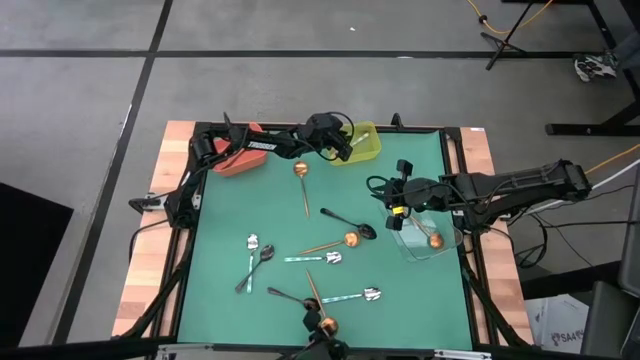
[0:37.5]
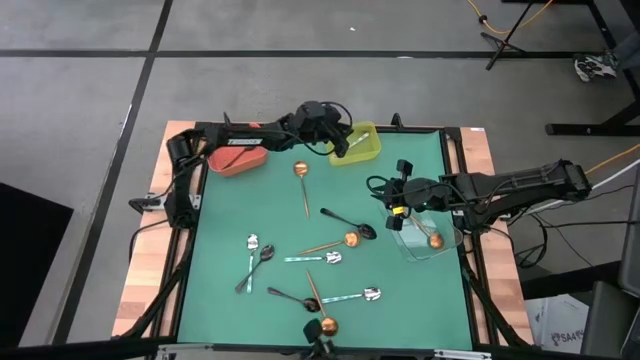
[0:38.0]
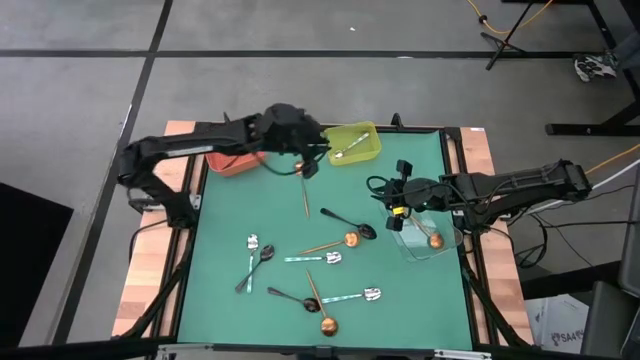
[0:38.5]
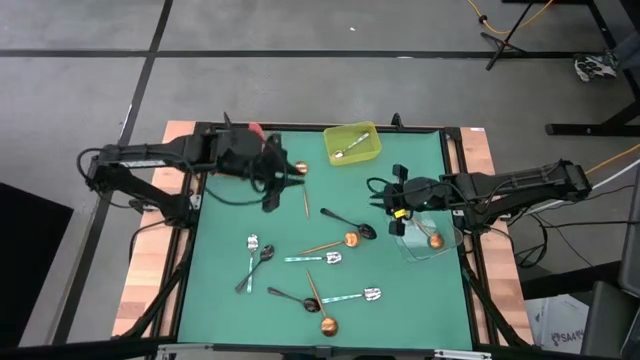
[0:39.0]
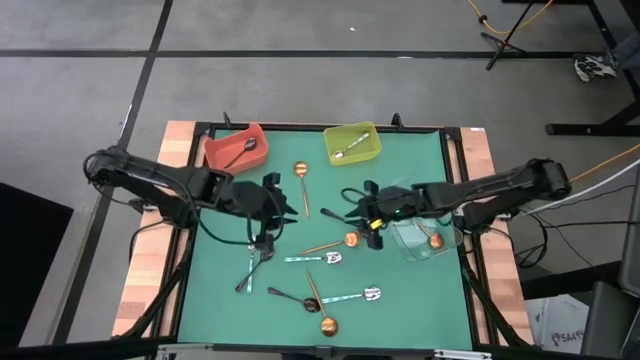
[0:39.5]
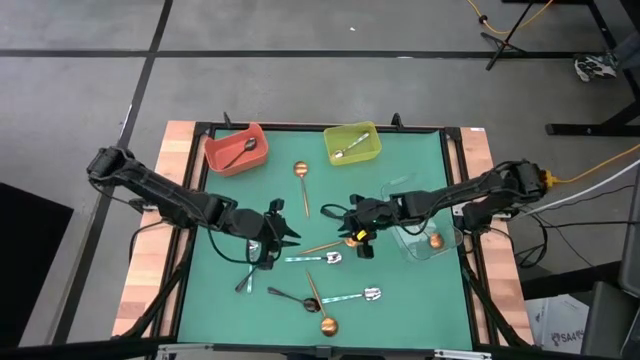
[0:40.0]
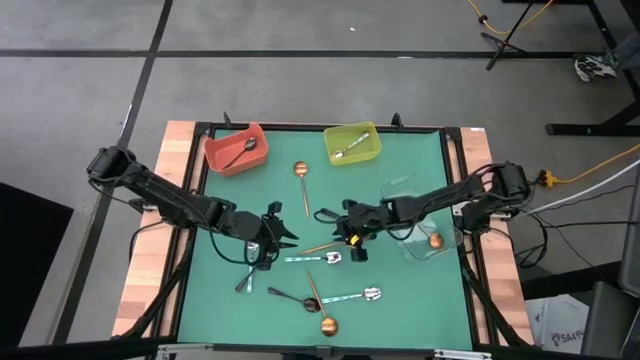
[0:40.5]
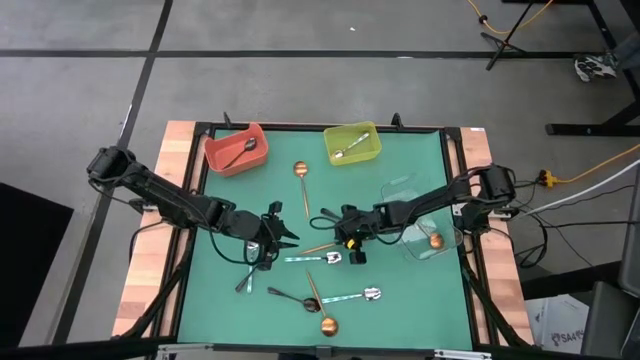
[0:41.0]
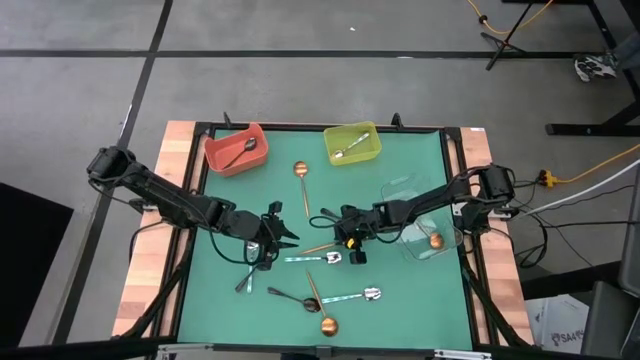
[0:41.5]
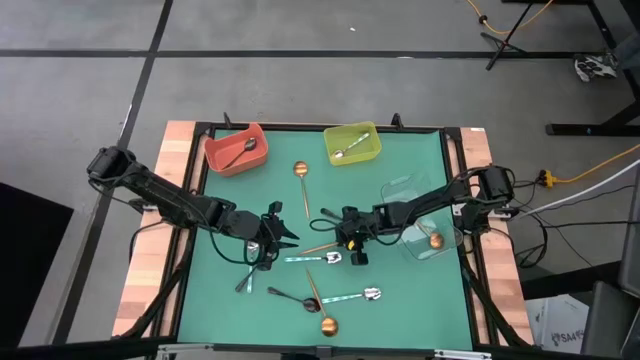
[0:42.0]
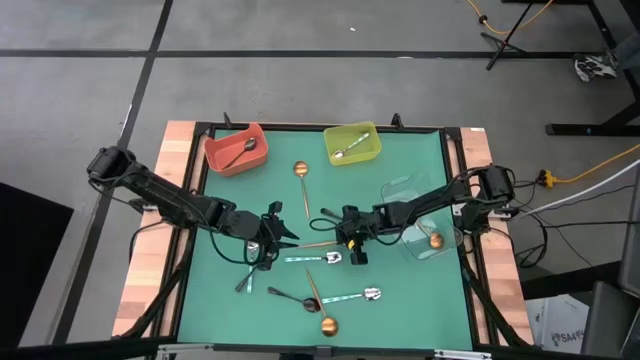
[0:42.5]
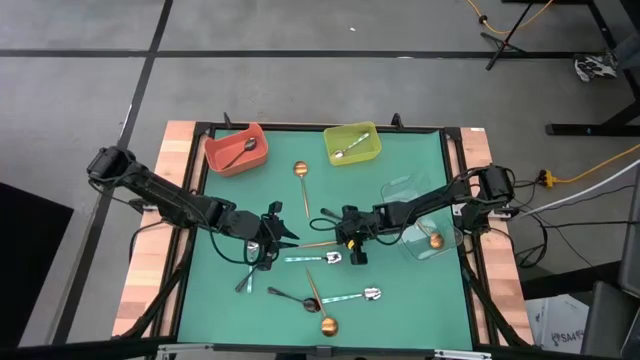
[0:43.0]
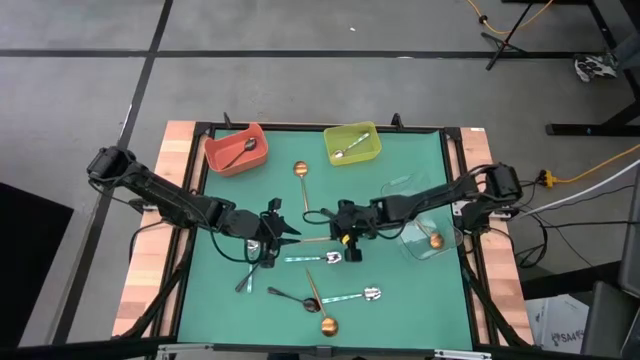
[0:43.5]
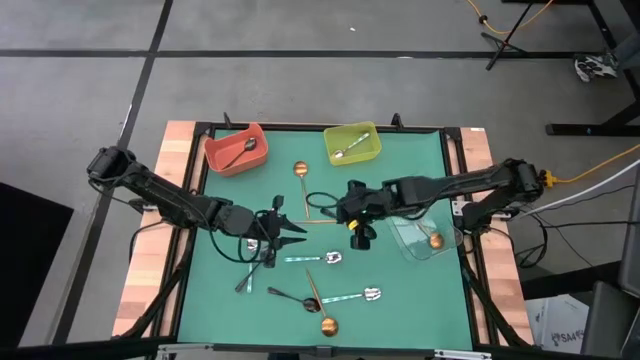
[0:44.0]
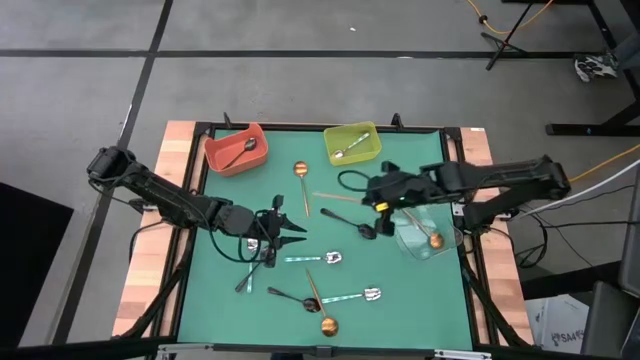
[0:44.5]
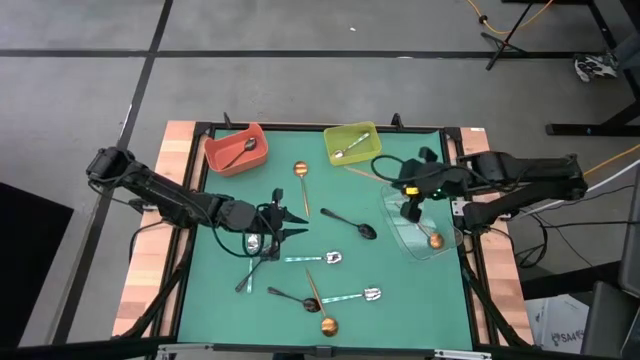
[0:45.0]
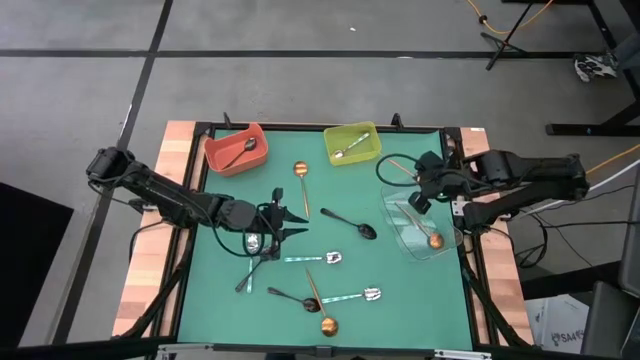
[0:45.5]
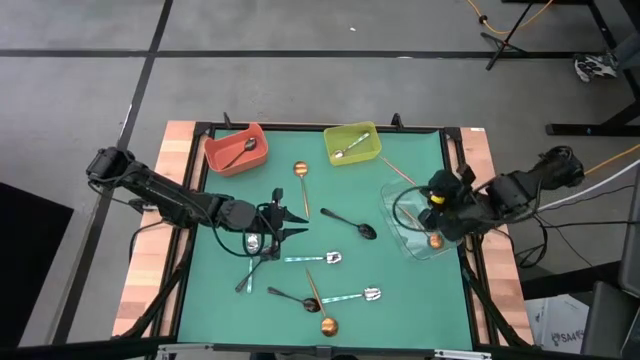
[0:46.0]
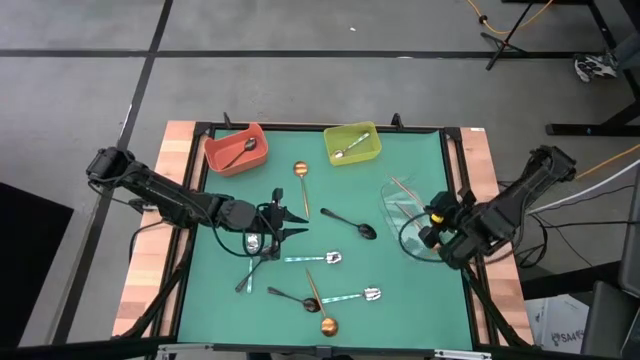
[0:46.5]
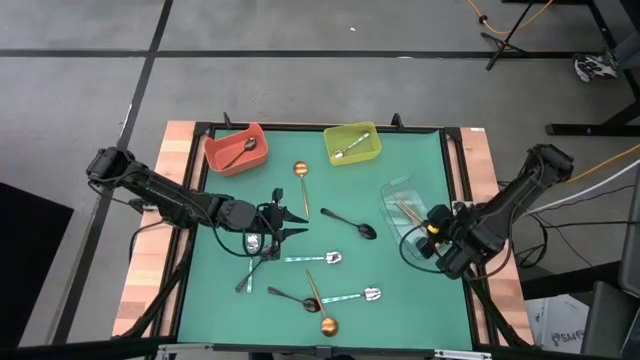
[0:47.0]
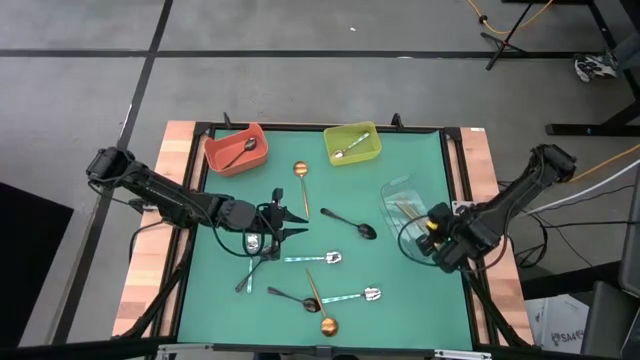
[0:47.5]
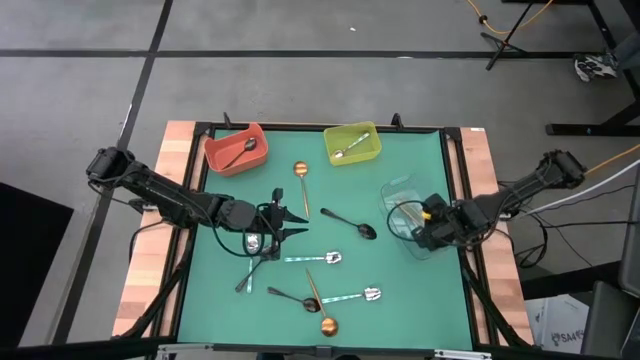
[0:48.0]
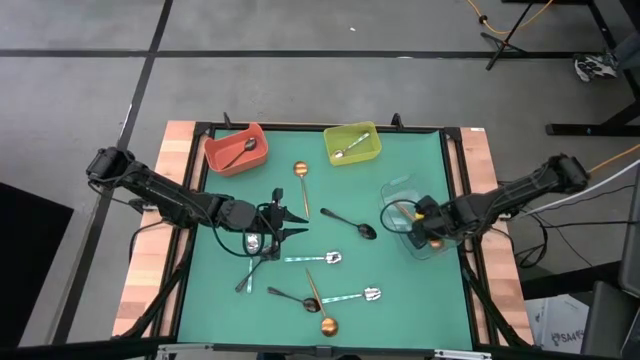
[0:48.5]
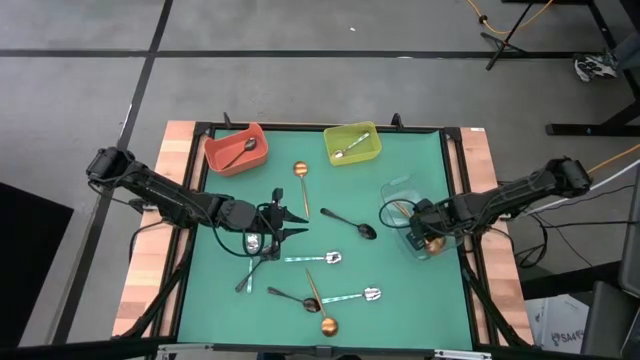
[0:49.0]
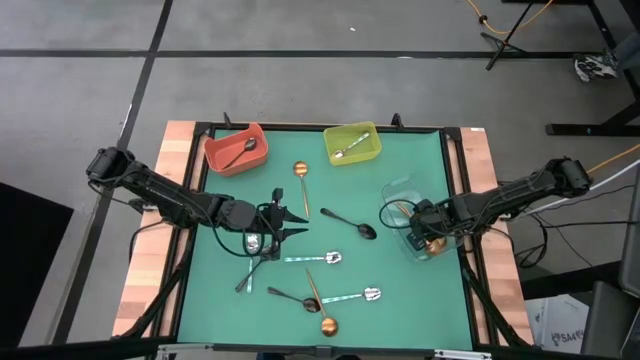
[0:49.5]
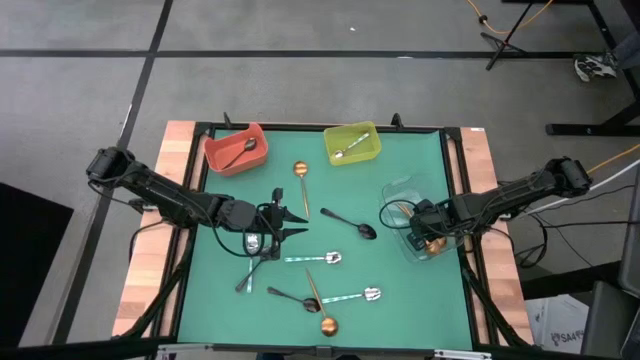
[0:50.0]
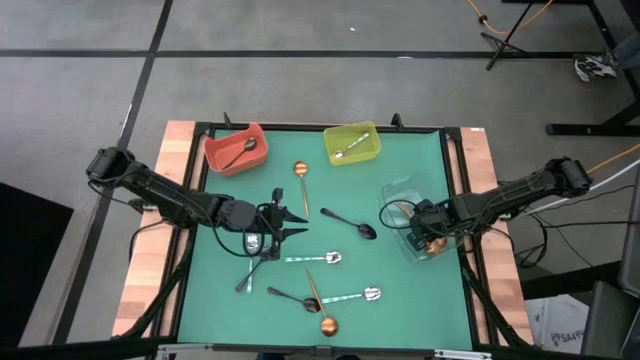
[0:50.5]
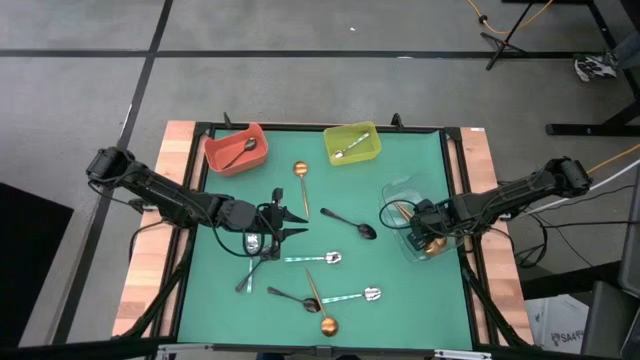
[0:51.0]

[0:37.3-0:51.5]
Task: Sort silverware by color (type)
Put the center gold spoon into the transparent bin

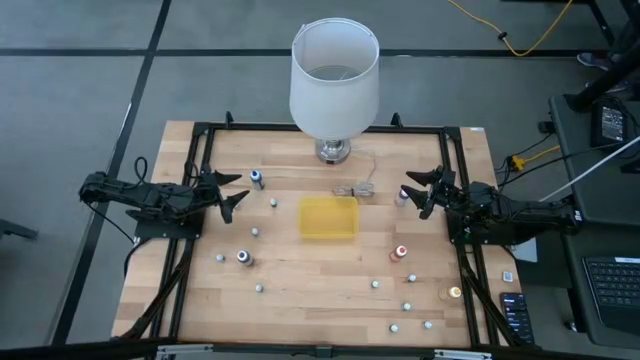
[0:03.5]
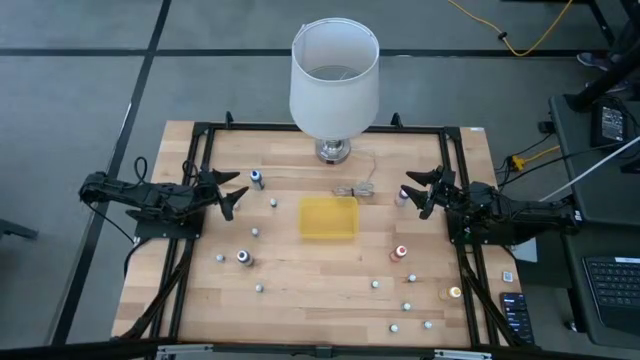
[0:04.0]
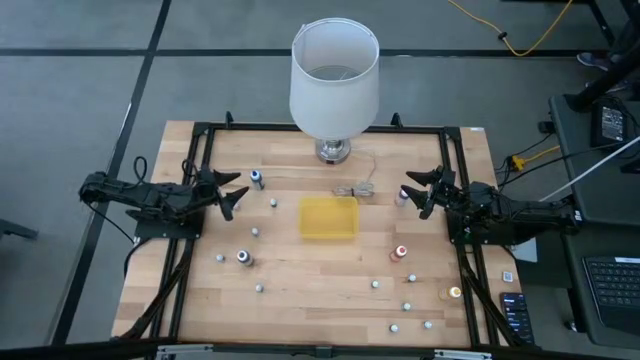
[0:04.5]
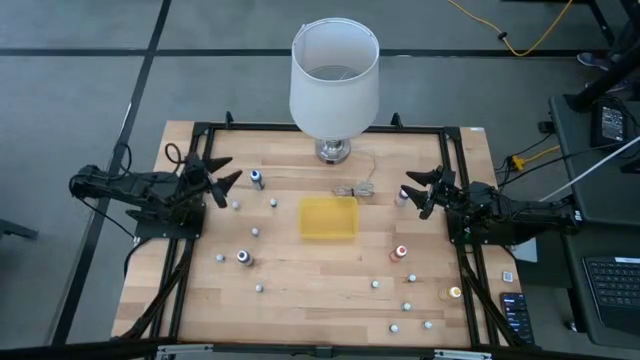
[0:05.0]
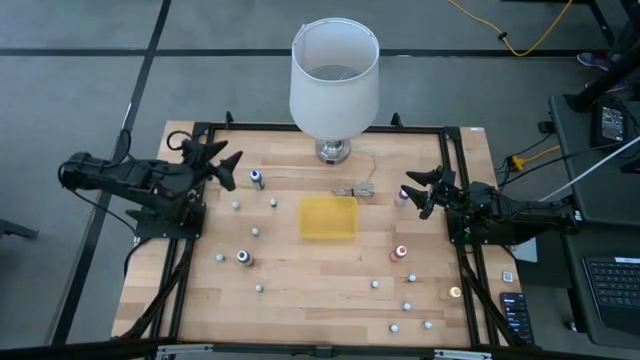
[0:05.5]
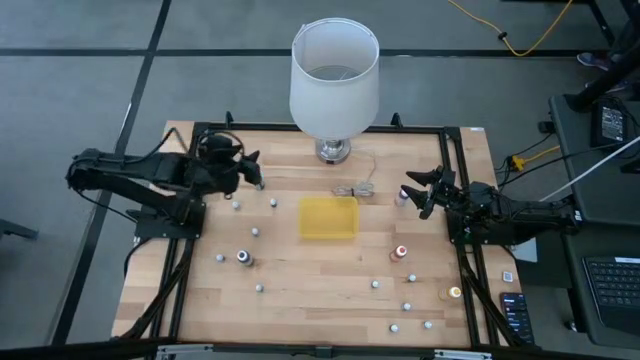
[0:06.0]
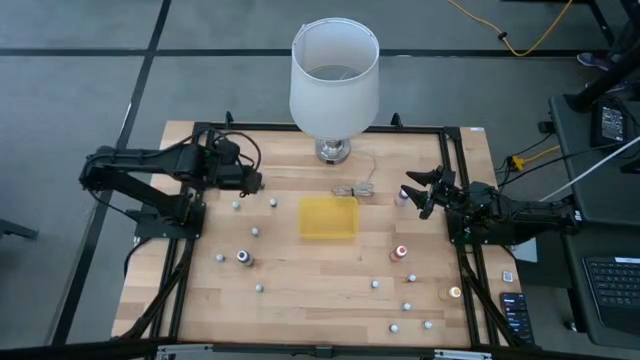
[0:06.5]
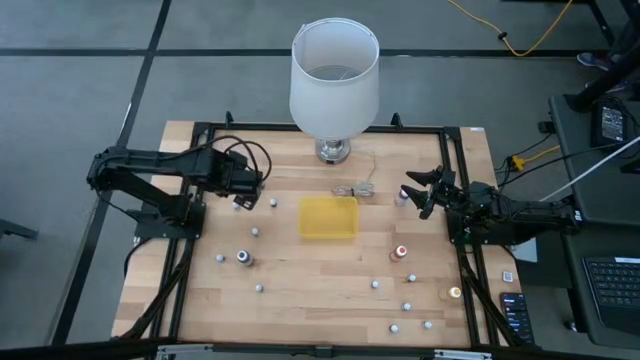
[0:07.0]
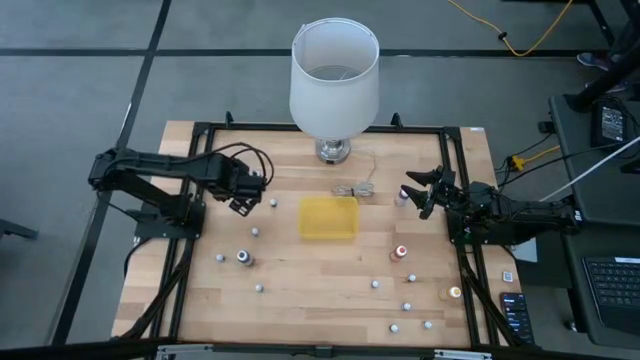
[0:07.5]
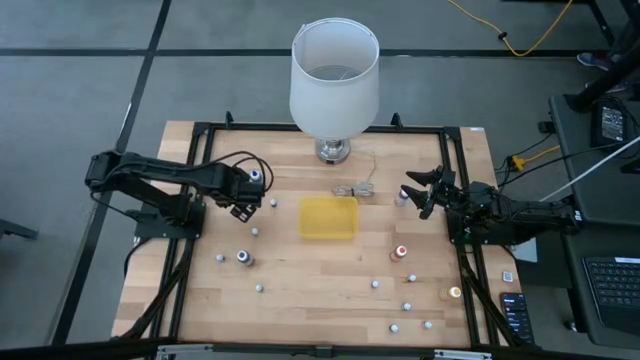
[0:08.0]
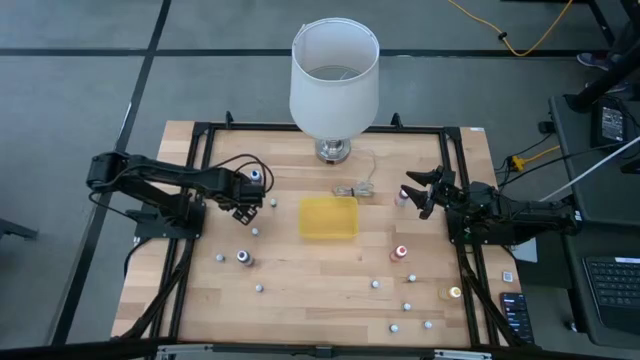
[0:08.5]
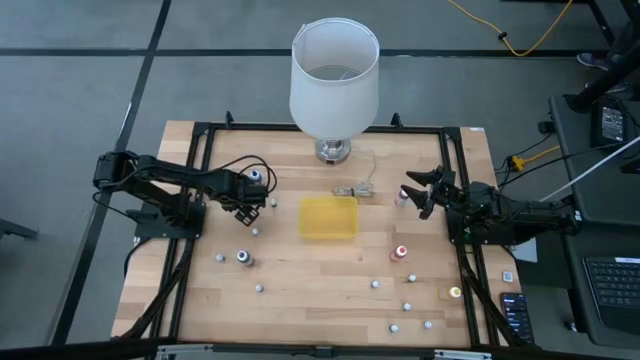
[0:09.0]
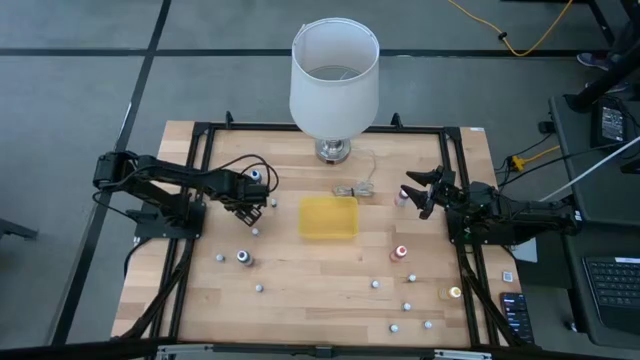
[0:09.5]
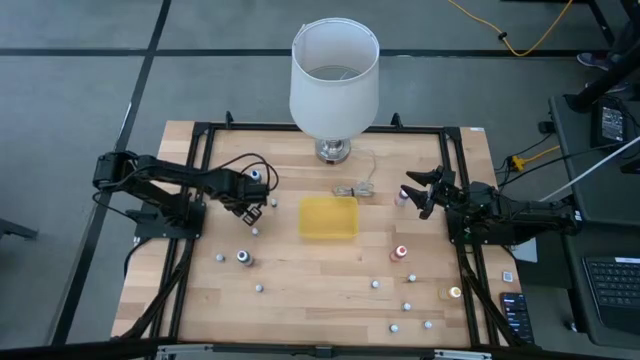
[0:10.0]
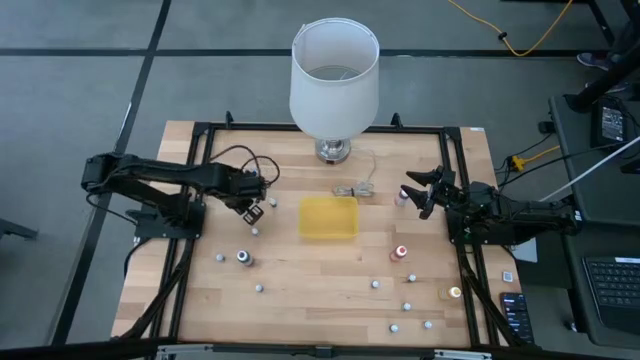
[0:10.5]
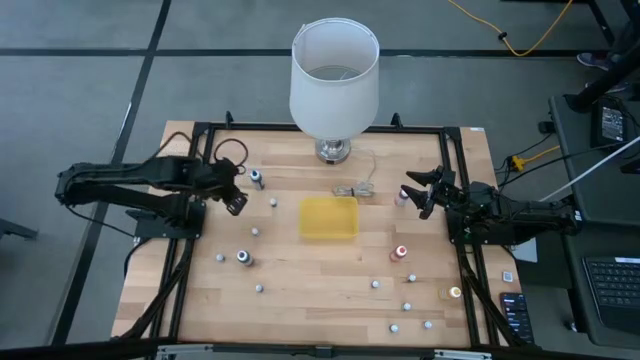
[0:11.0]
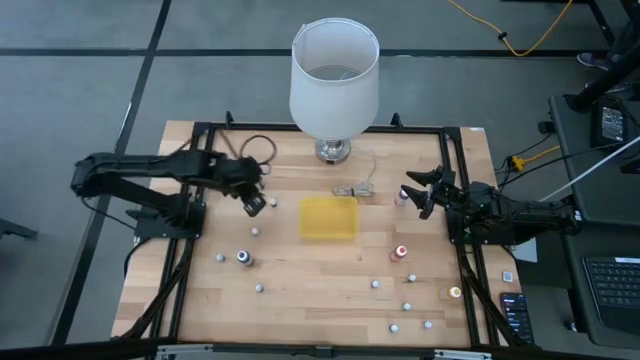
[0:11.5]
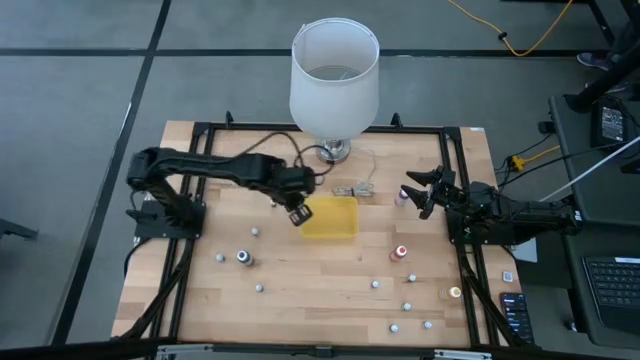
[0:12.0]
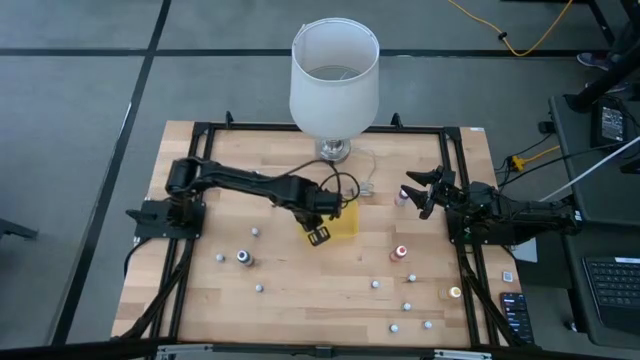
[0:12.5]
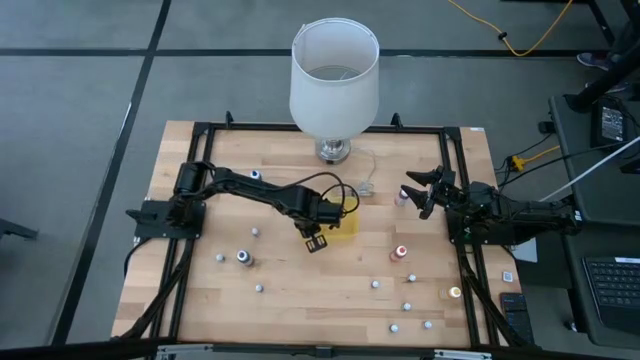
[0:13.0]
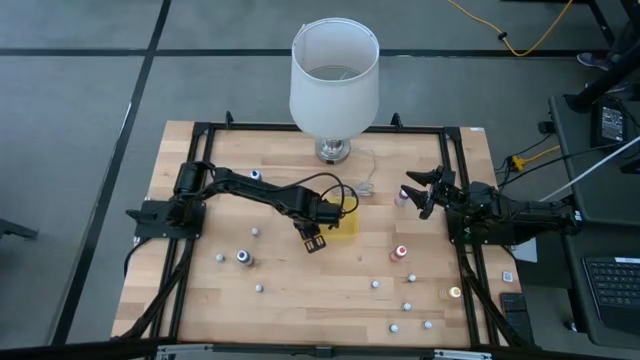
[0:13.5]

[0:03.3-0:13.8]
Task: Pick & Place food coloring
Put the top left small red food coloring bottle into the yellow bin
